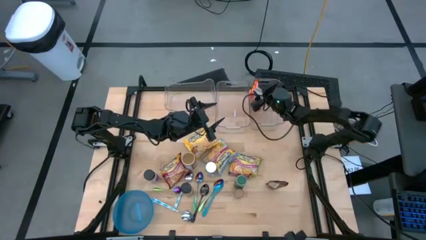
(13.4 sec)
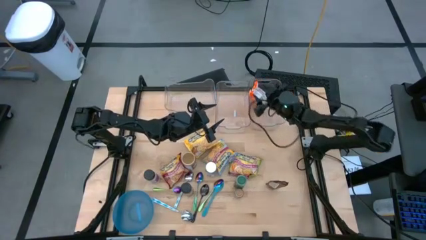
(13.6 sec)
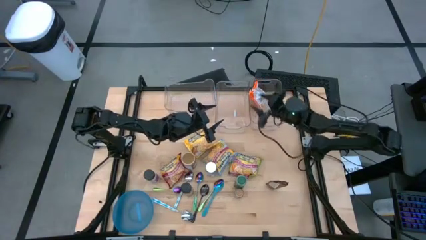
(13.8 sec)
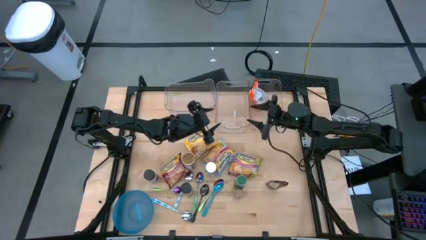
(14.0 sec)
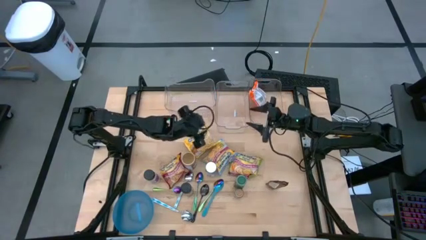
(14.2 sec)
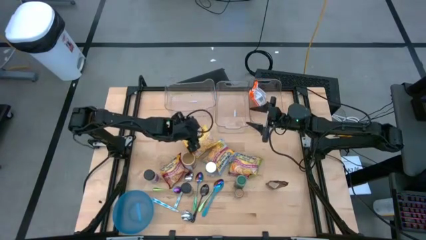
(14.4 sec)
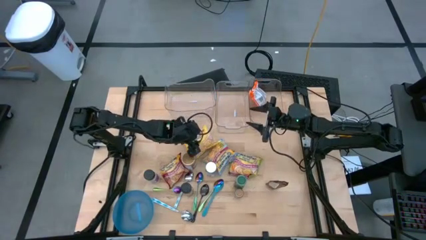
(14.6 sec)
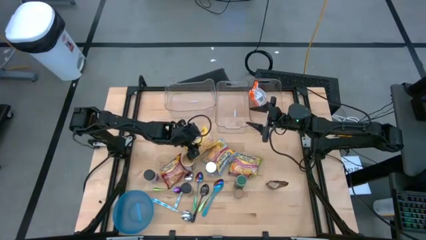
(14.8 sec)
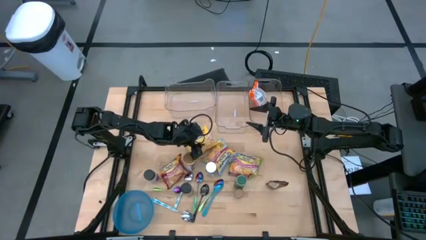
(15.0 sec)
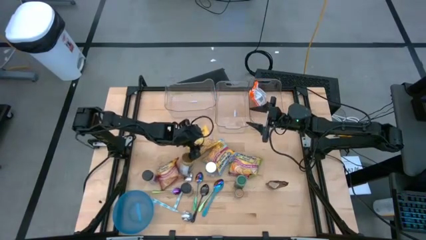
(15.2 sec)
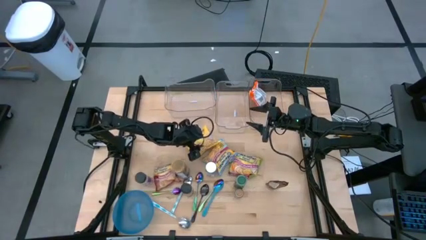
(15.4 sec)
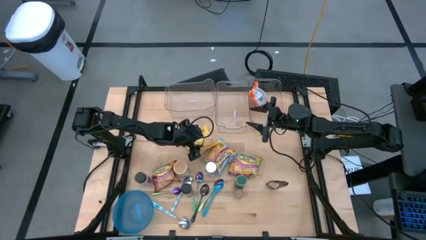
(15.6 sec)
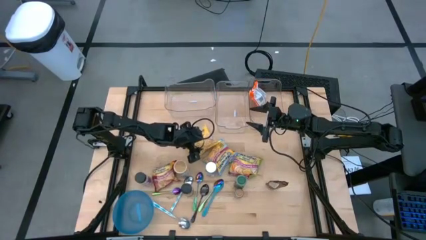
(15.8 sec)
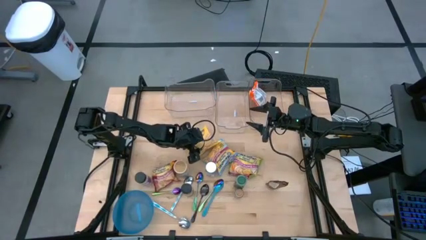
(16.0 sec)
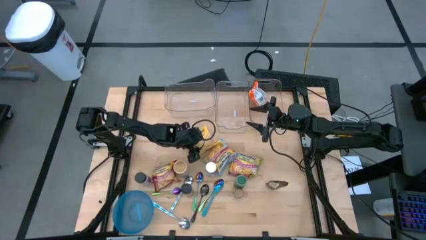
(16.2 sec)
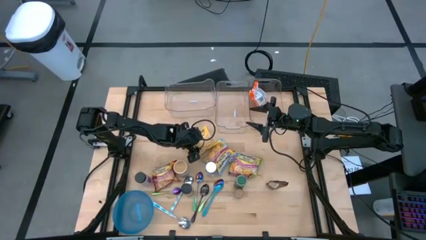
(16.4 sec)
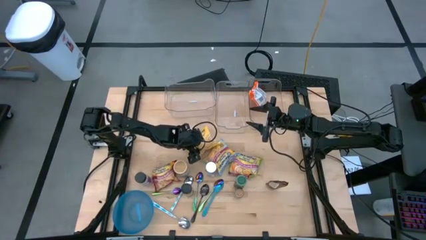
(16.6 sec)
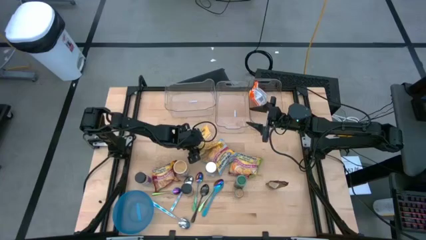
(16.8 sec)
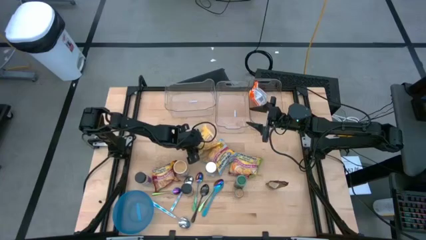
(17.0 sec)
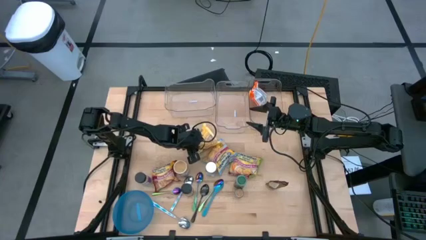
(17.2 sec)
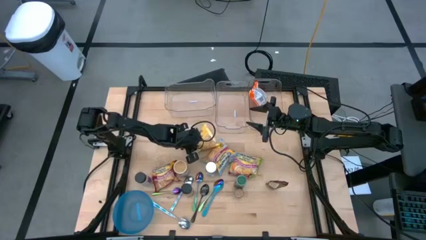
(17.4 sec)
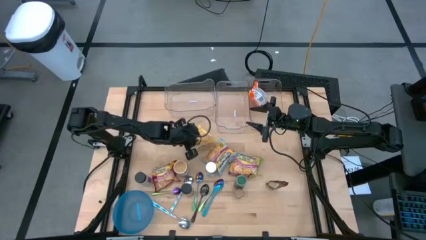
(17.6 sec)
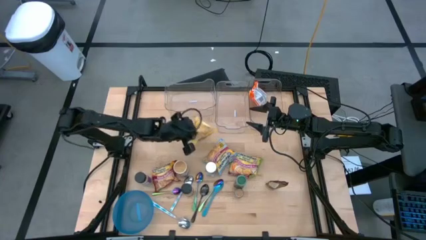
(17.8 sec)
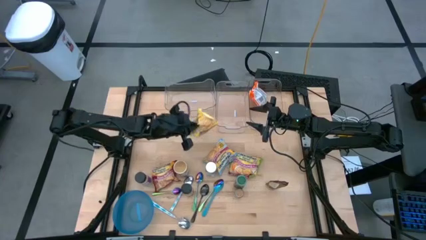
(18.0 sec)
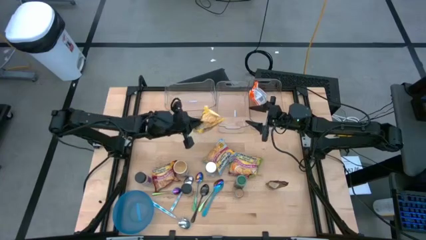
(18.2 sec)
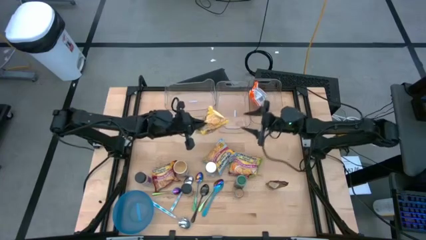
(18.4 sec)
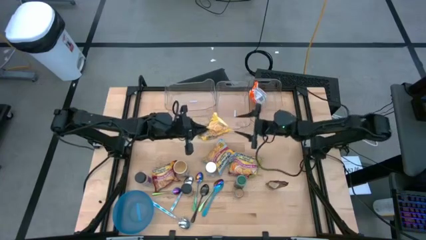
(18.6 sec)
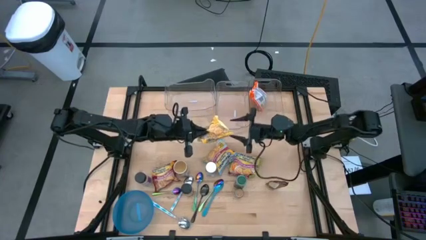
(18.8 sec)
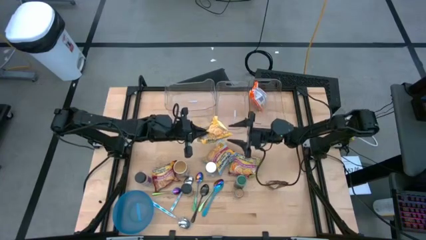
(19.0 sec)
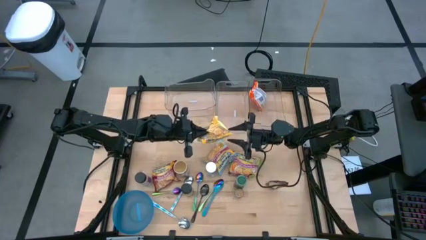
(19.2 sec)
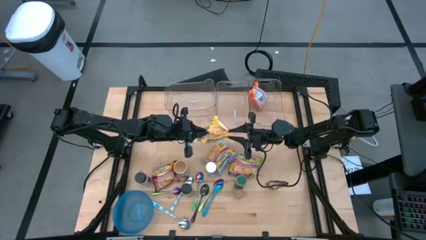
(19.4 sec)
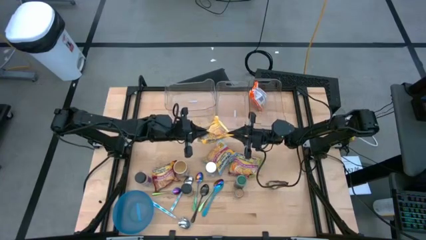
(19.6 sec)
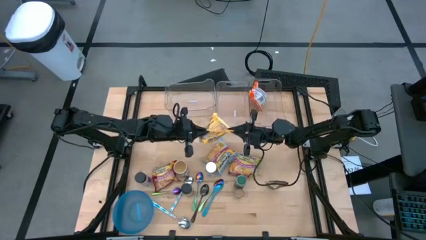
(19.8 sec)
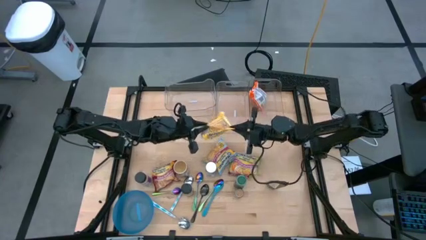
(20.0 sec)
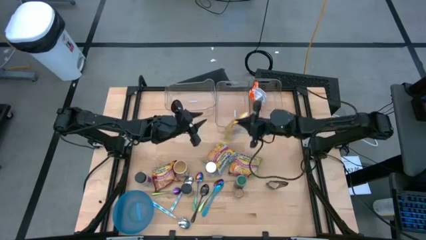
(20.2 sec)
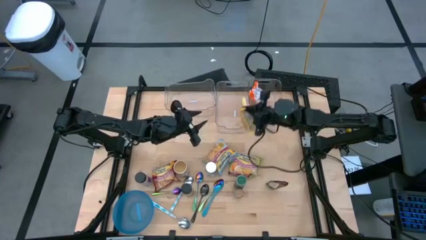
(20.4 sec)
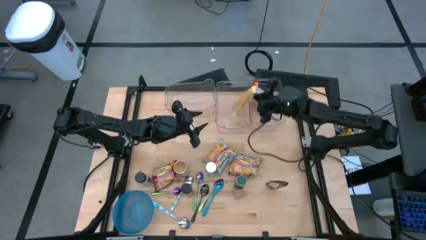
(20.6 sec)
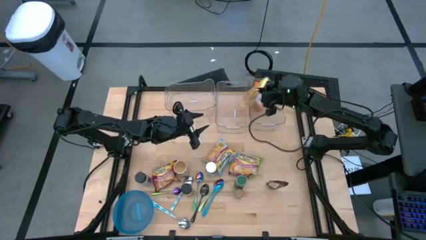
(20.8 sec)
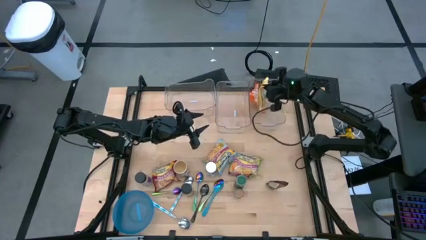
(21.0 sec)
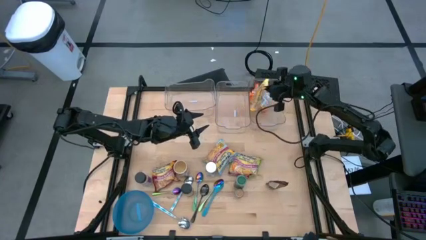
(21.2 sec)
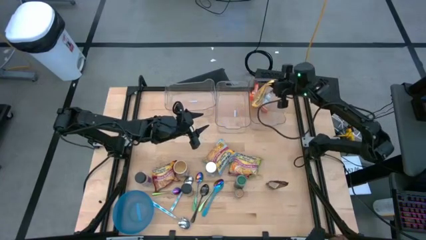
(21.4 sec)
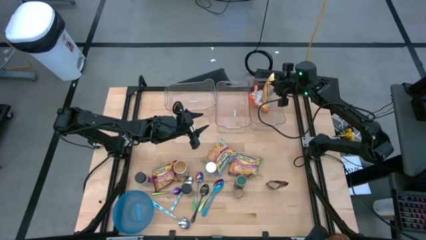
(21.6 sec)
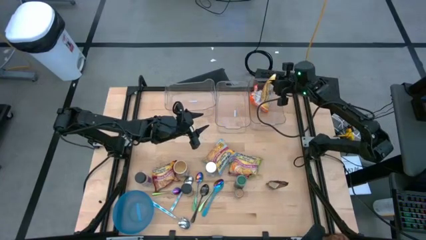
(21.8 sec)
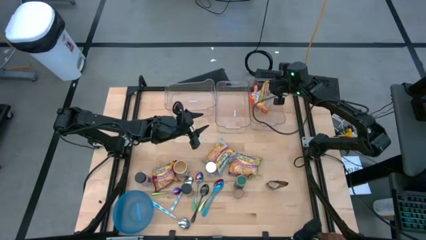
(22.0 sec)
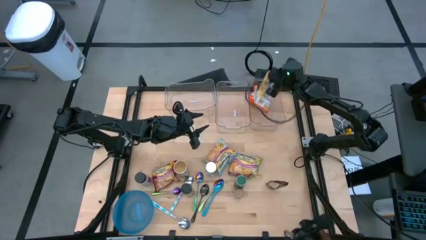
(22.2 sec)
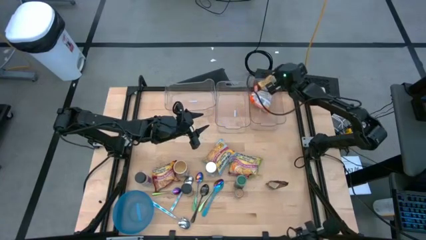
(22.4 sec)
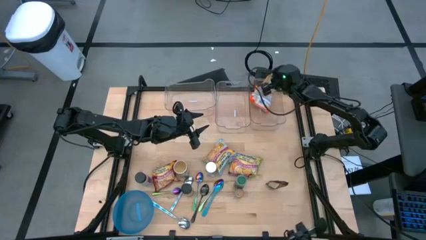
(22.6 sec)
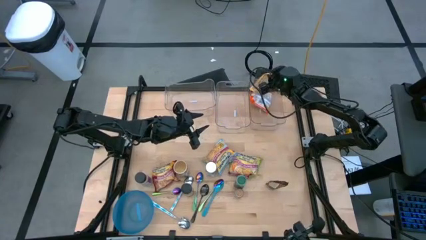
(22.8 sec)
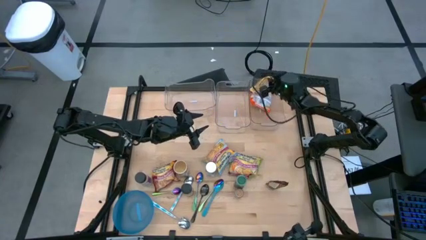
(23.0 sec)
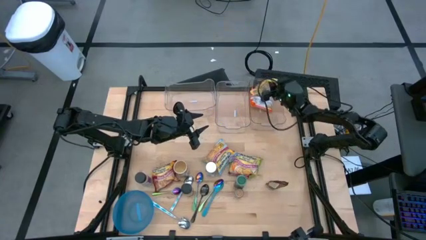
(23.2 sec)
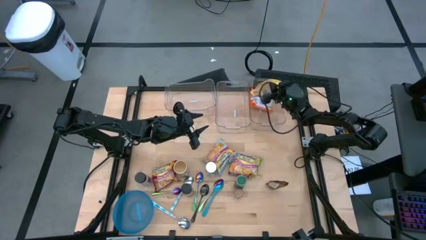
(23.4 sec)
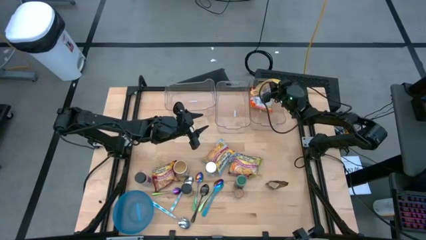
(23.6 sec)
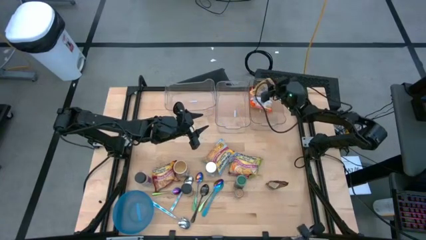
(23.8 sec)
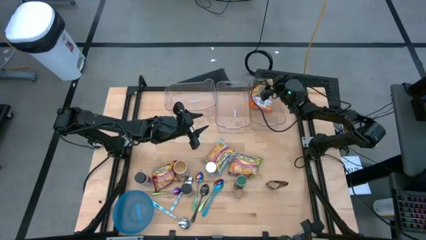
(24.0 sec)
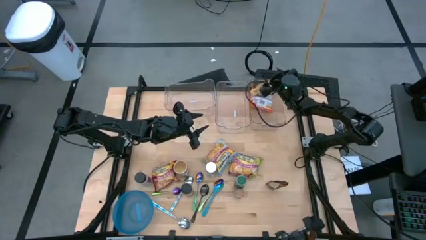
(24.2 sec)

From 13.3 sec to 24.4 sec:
Task: Pick & Place Food Item
Put the yellow noodle pack into the right transparent bin
